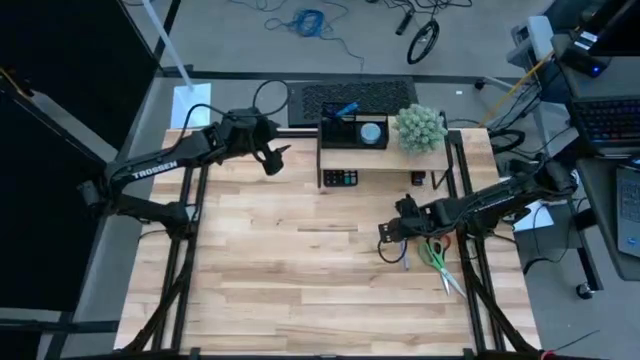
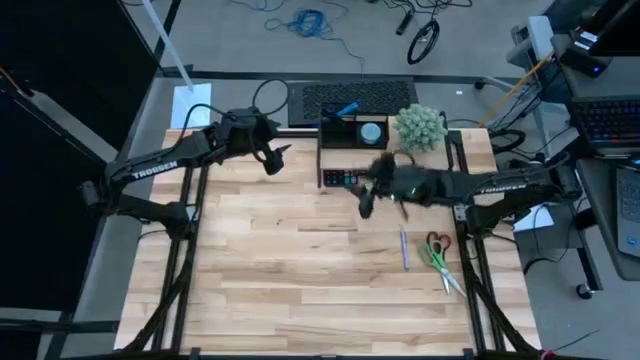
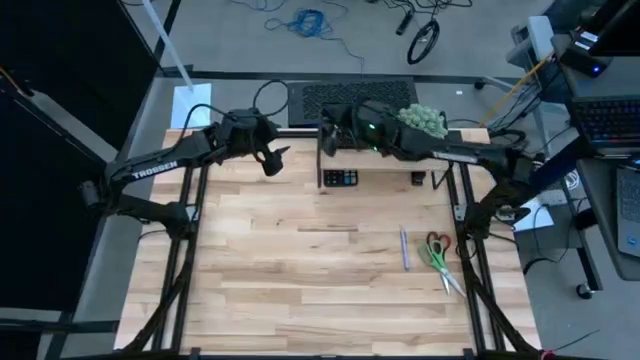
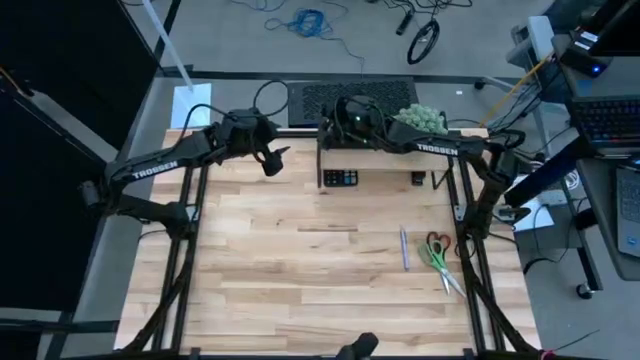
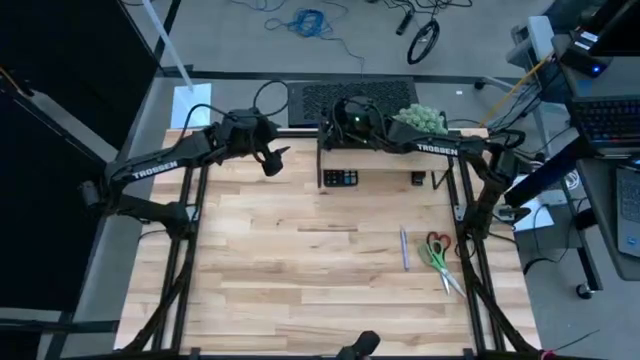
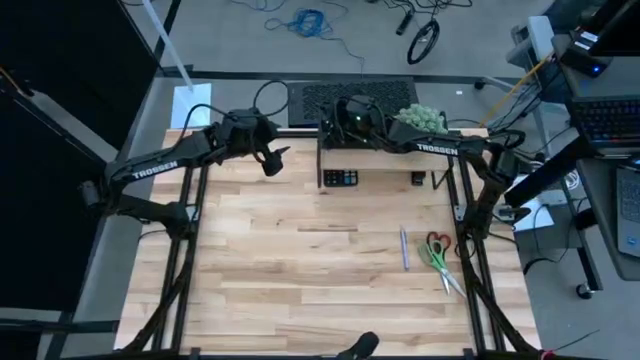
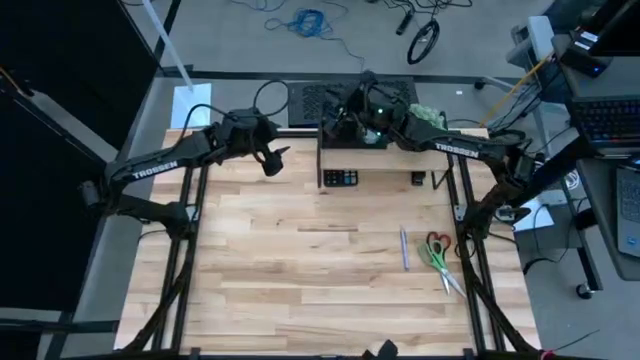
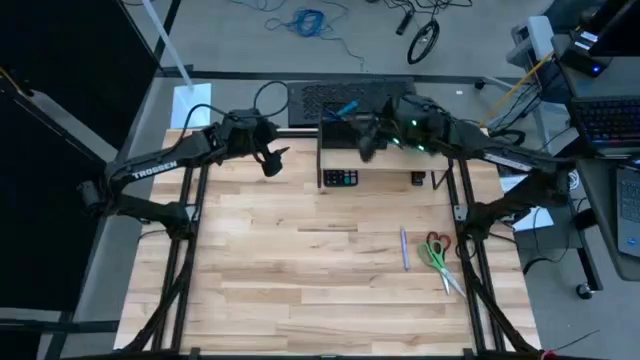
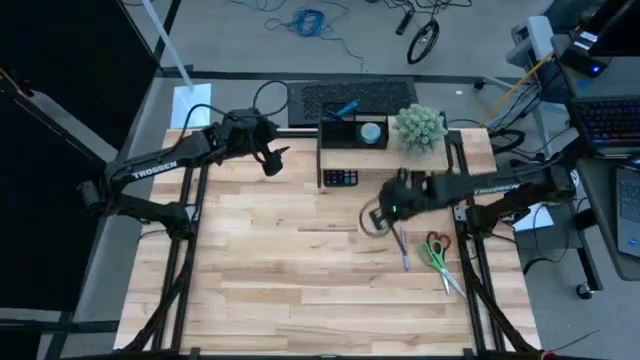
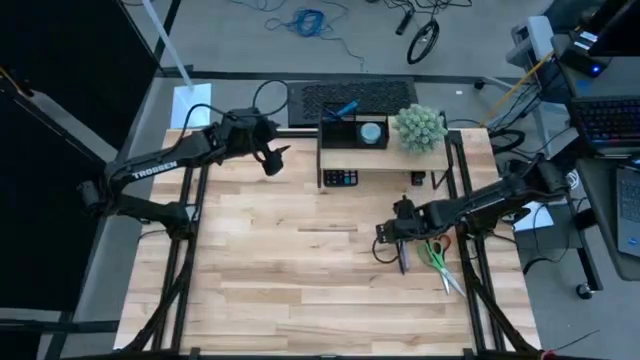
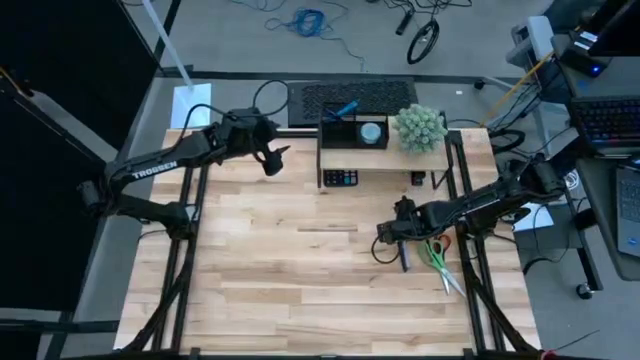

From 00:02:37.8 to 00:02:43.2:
Task: Pick and place office supplies into organizer
Remove the black pen from the black desk organizer on the shelf

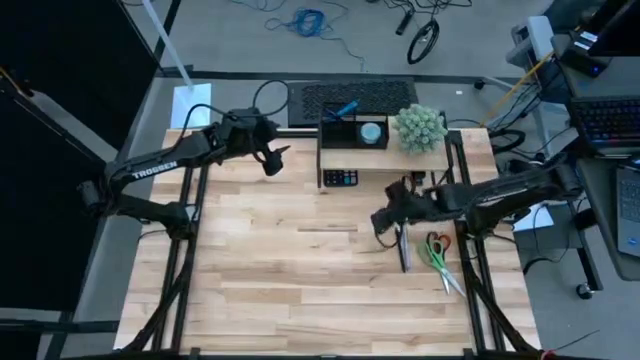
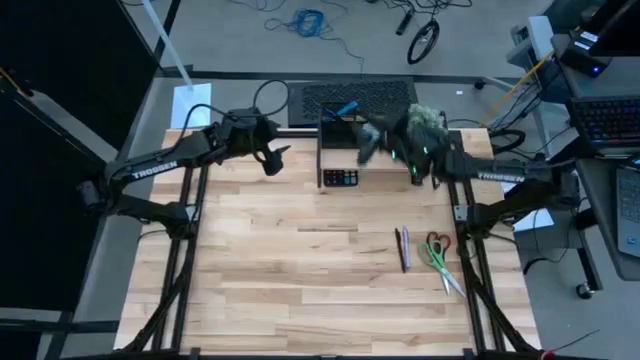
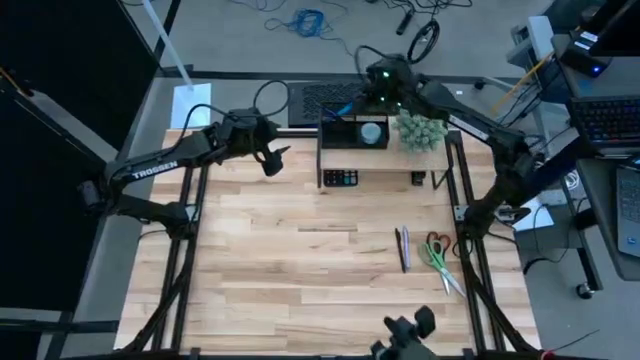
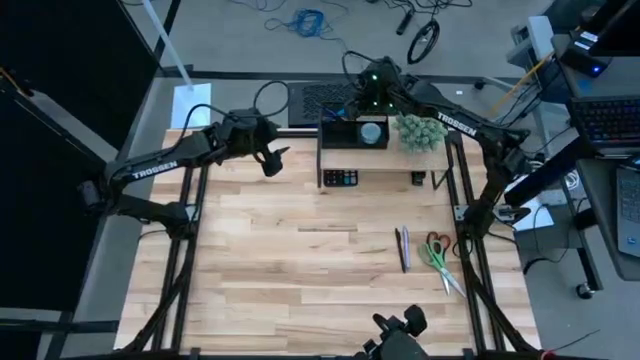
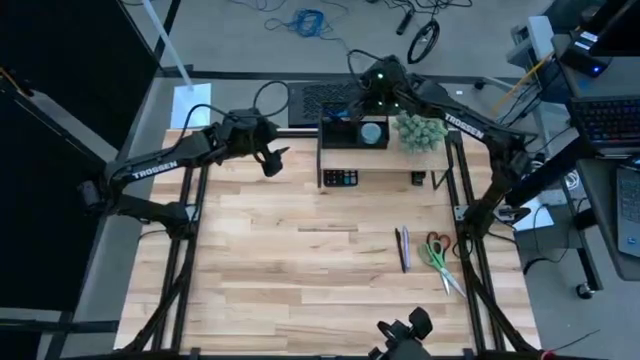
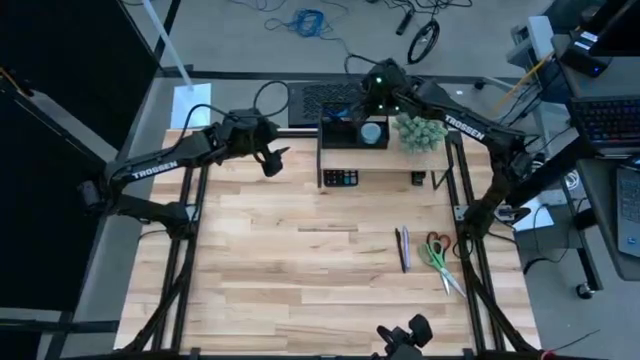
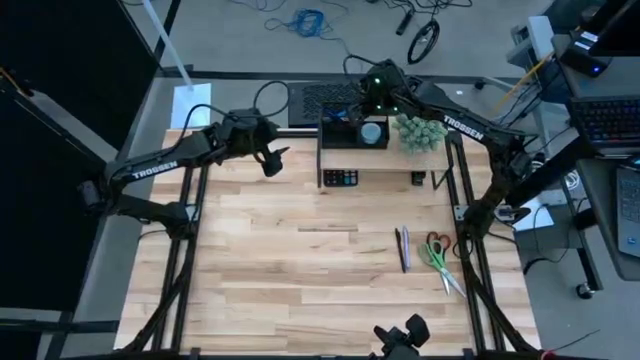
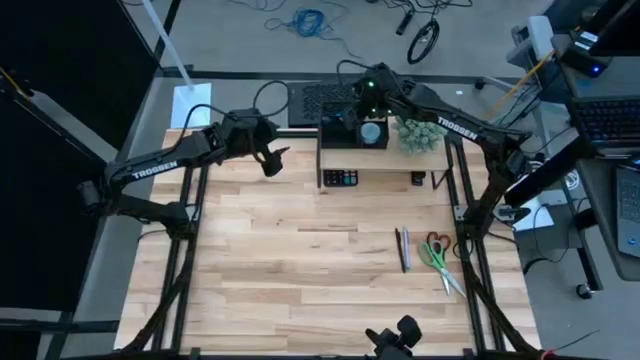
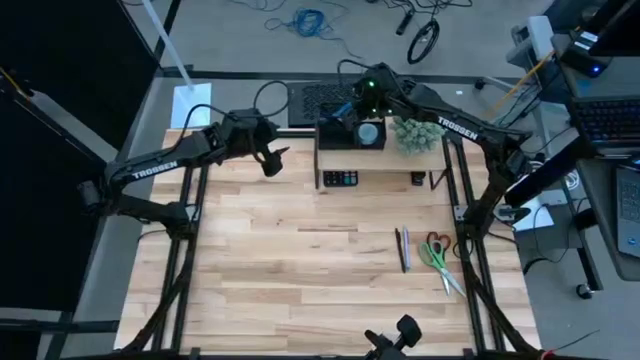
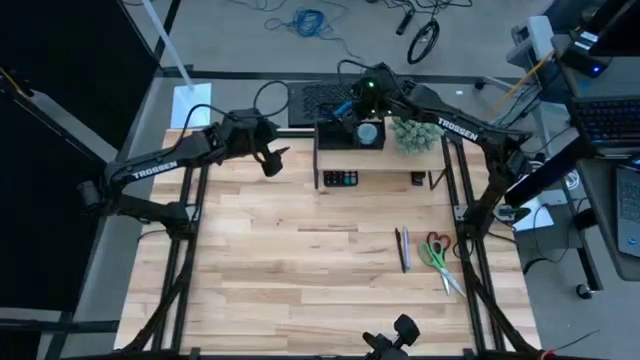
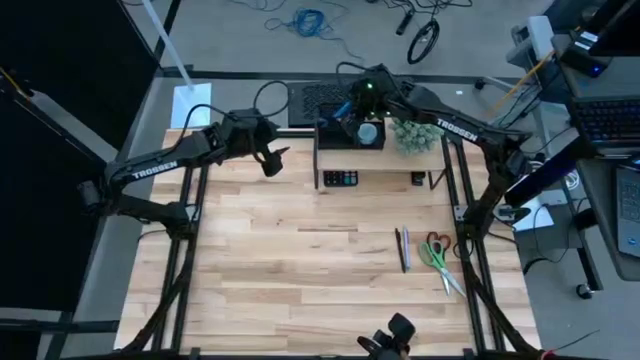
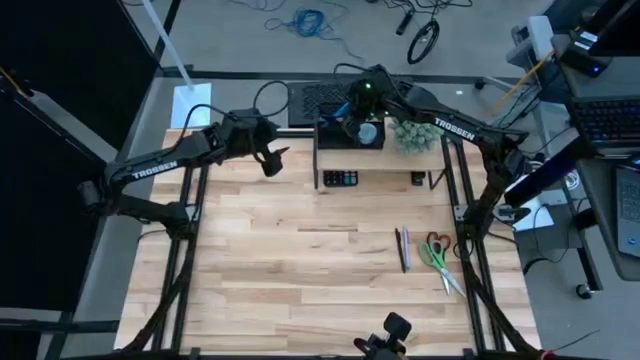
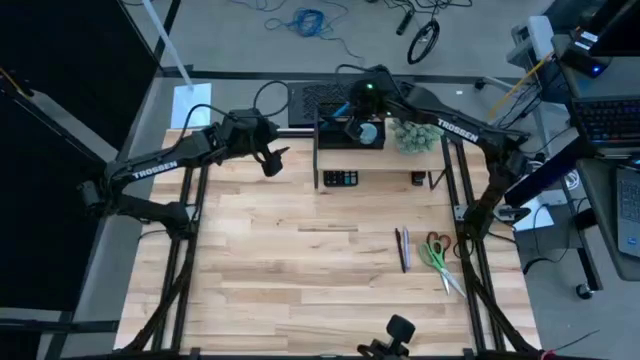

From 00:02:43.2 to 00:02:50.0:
Remove the blue pen from the black desk organizer on the shelf

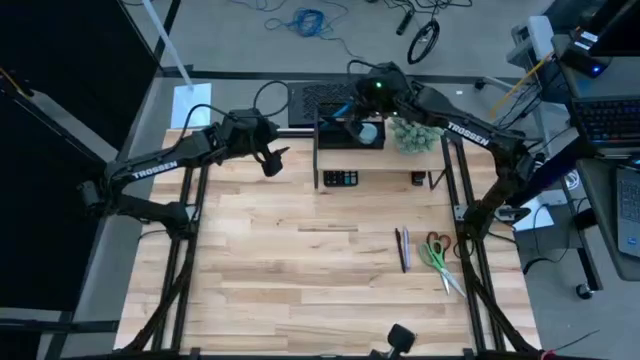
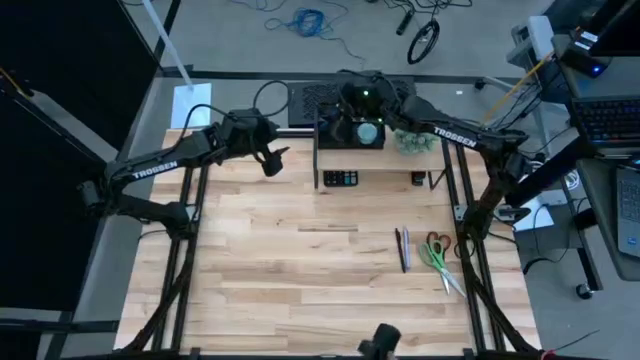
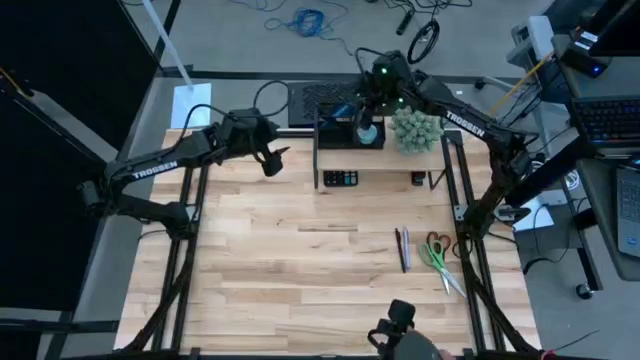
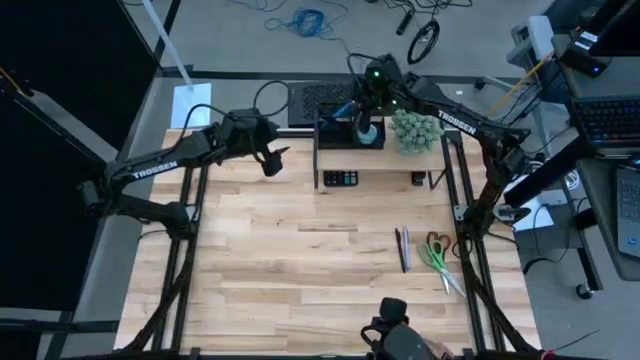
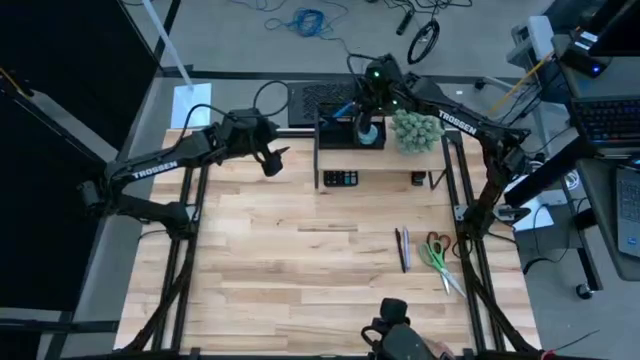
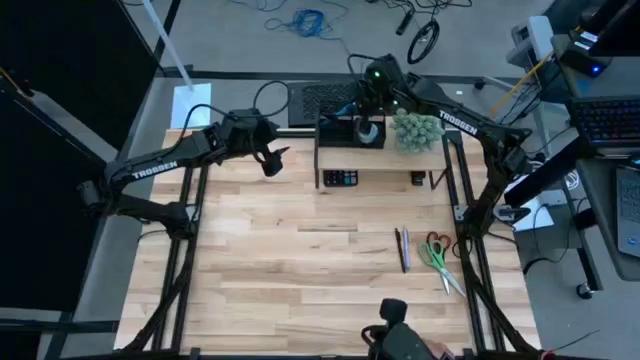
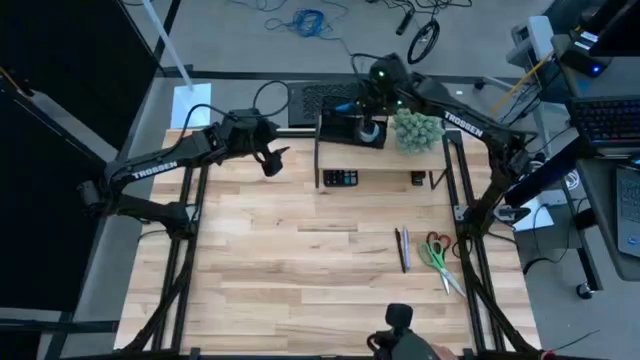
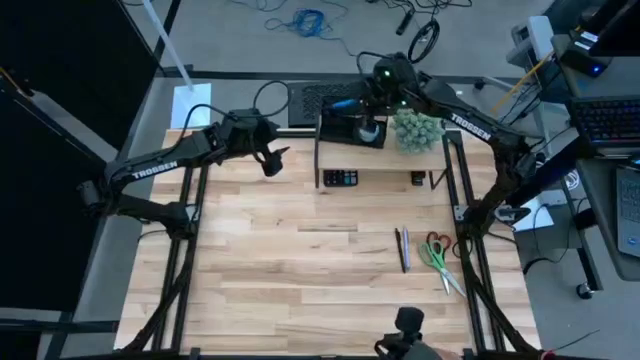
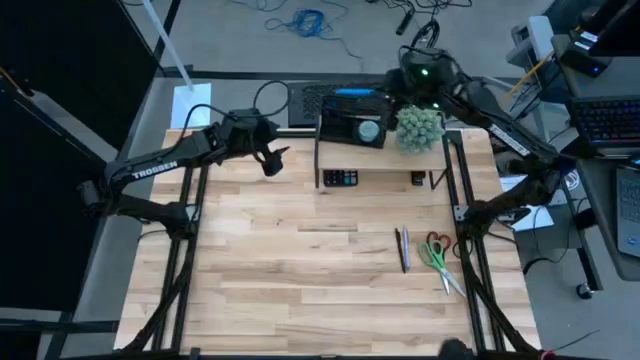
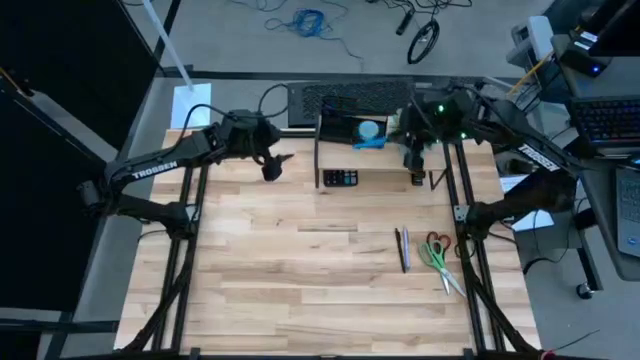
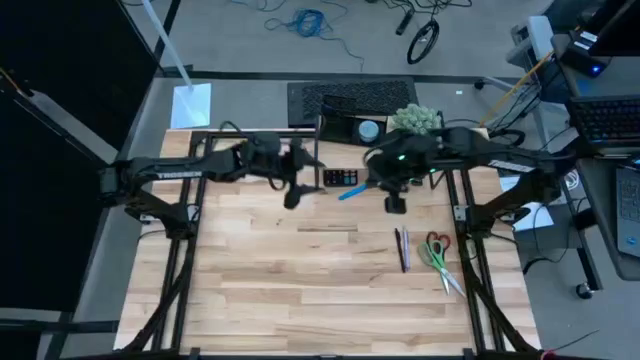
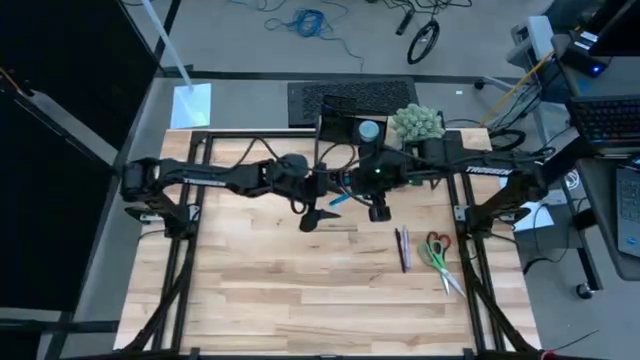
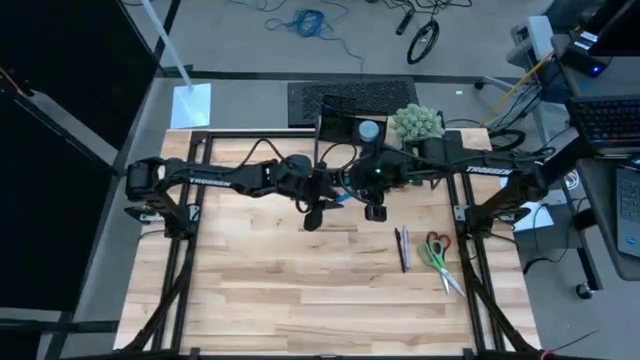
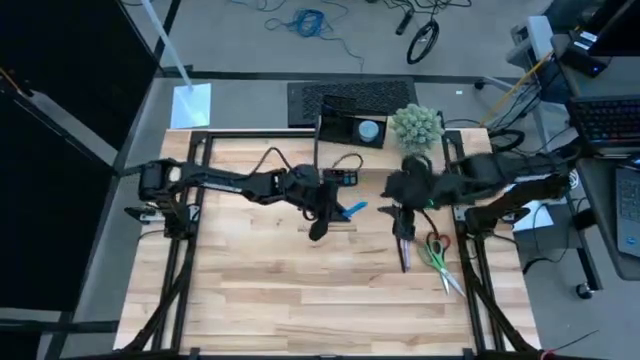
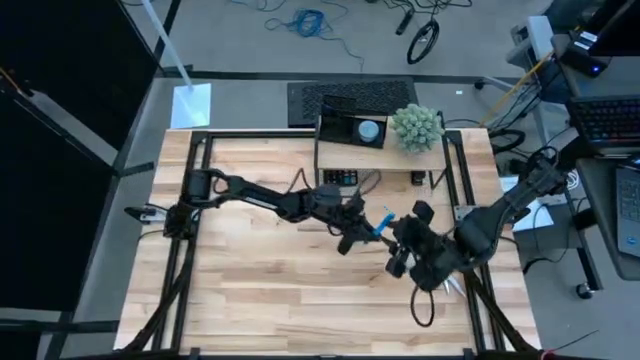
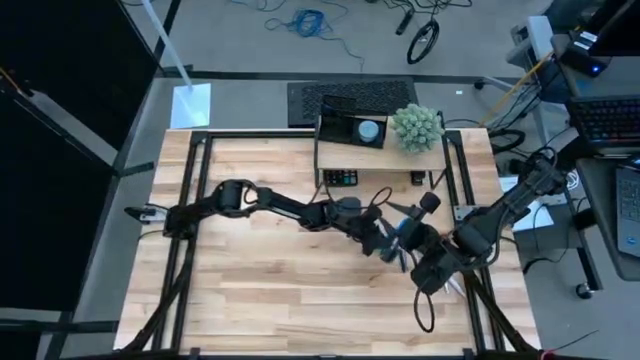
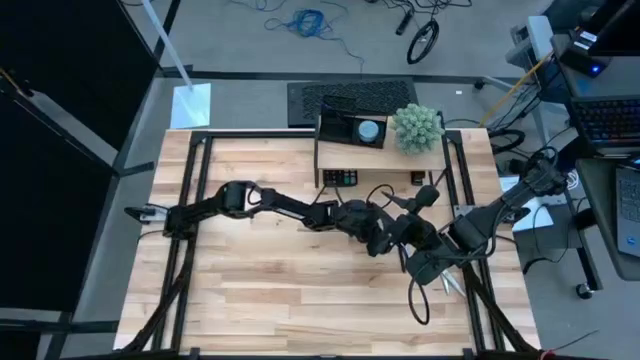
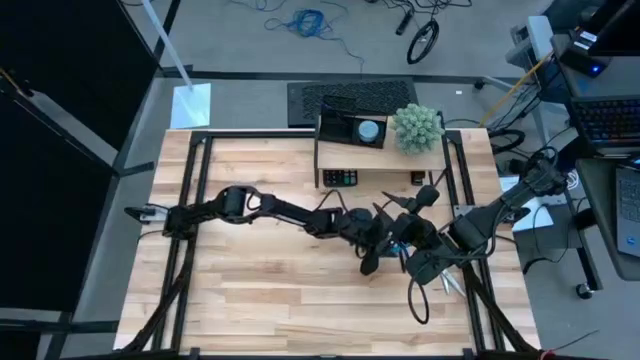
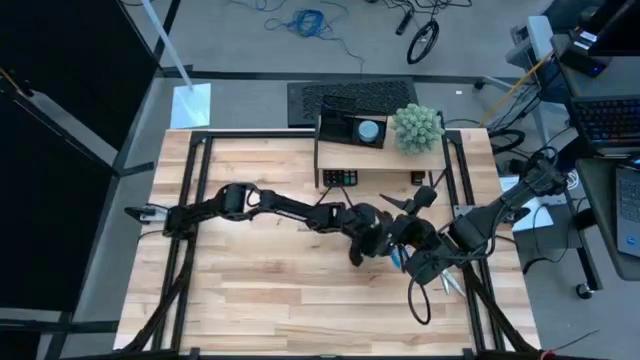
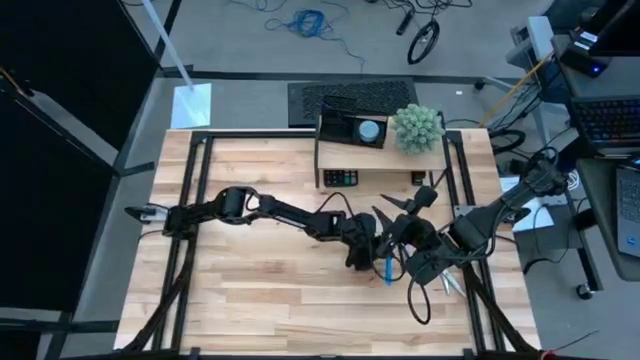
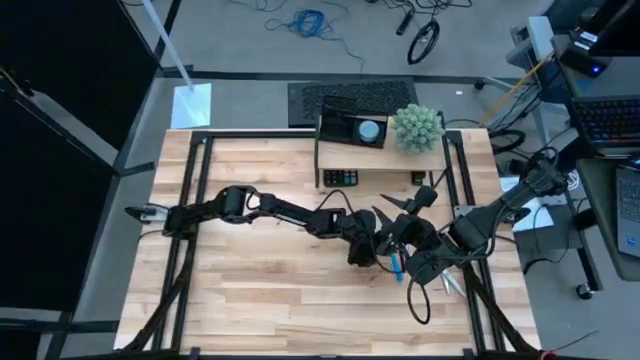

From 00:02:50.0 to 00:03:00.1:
Remove the blue pen from the black desk organizer on the shelf
